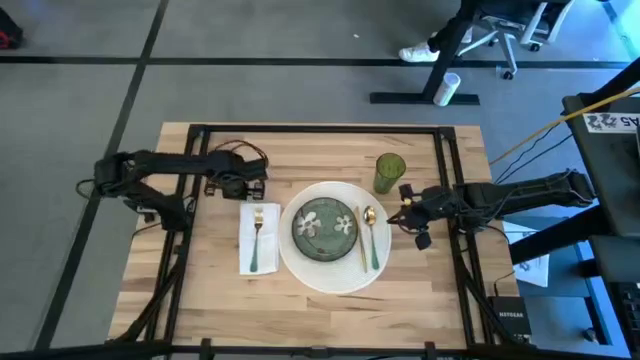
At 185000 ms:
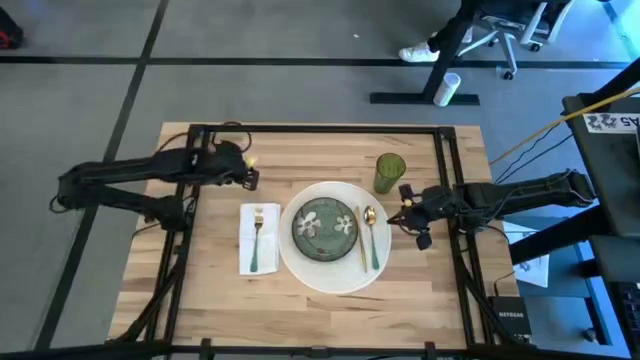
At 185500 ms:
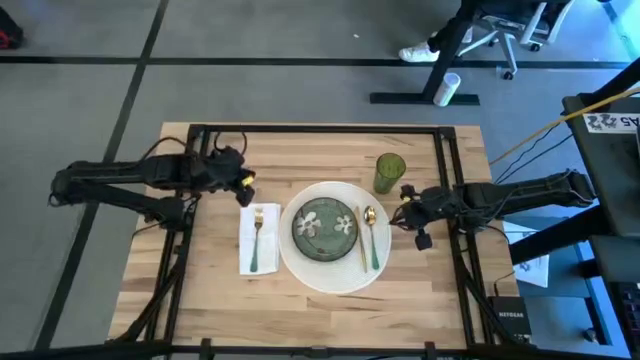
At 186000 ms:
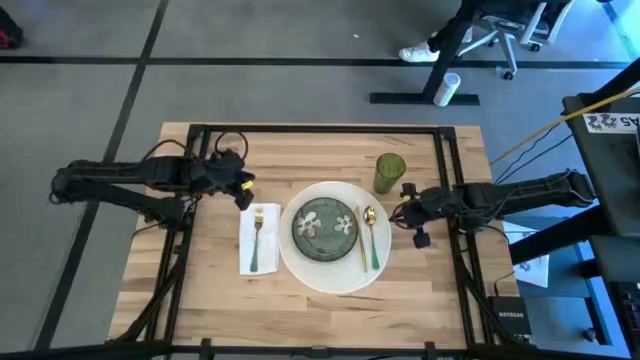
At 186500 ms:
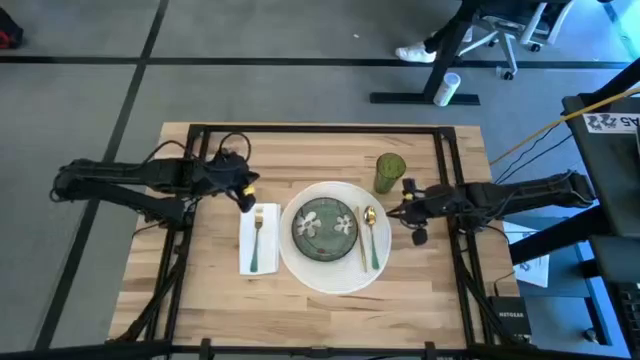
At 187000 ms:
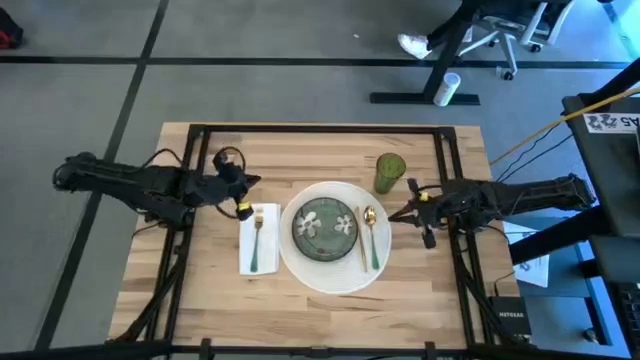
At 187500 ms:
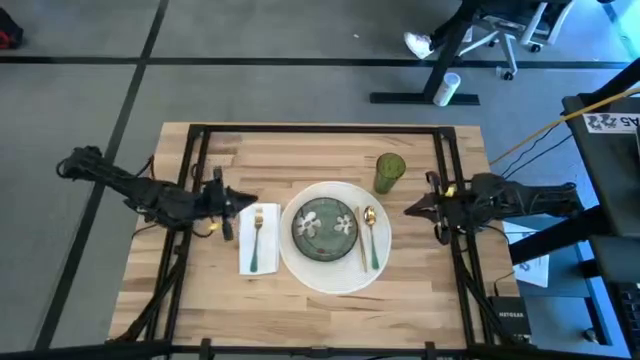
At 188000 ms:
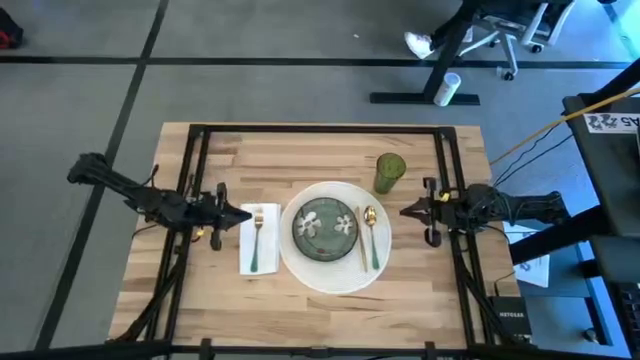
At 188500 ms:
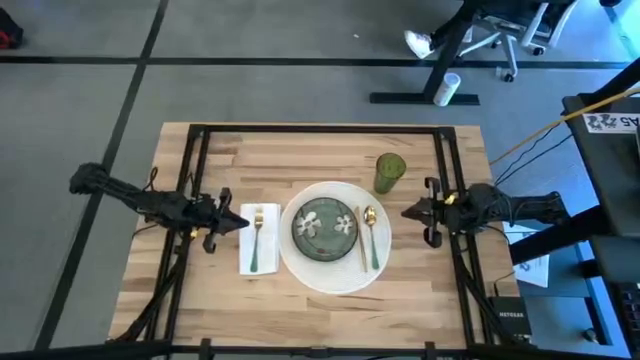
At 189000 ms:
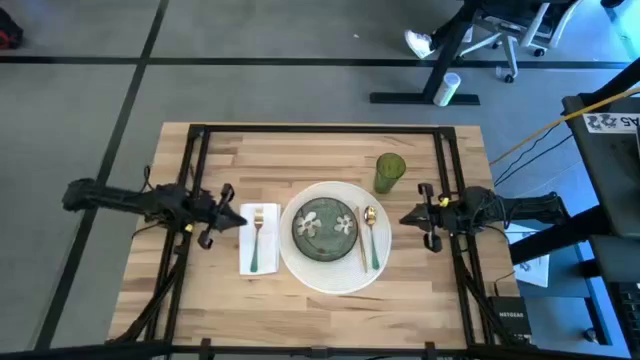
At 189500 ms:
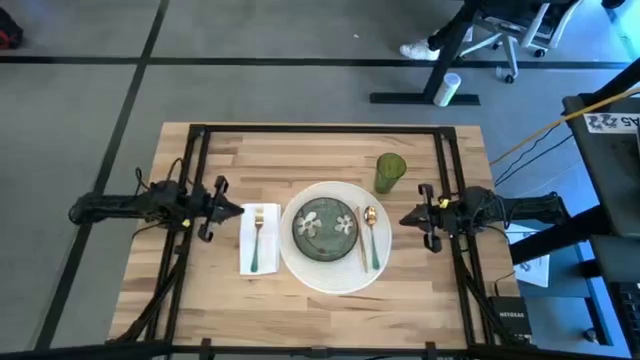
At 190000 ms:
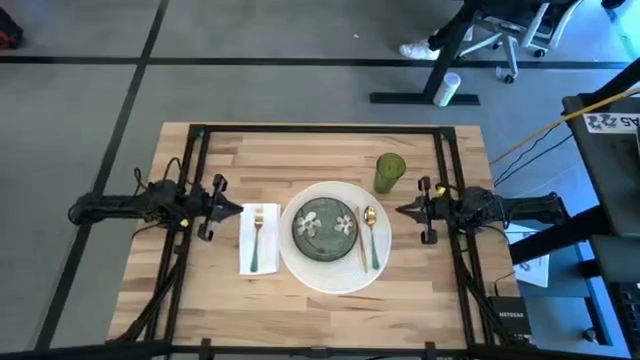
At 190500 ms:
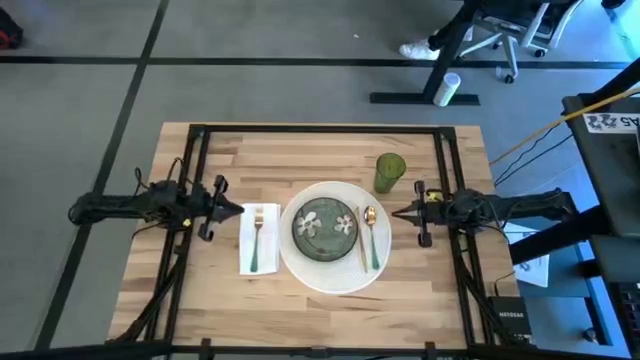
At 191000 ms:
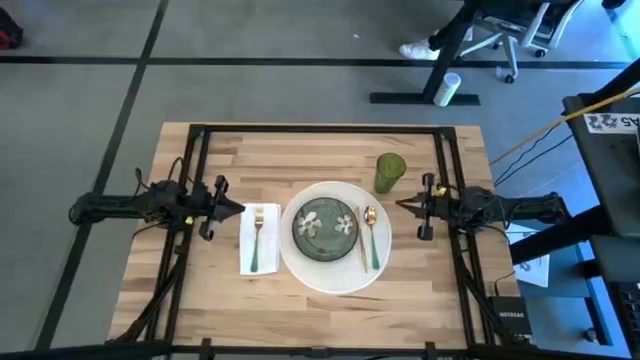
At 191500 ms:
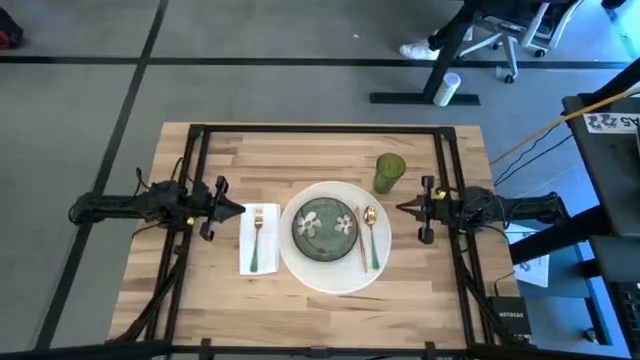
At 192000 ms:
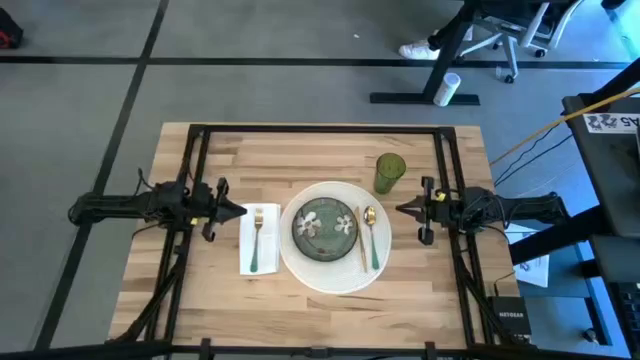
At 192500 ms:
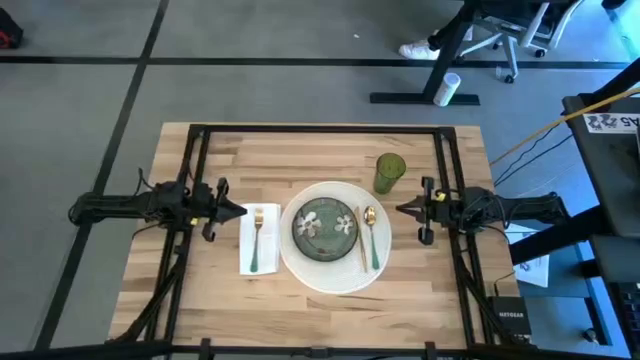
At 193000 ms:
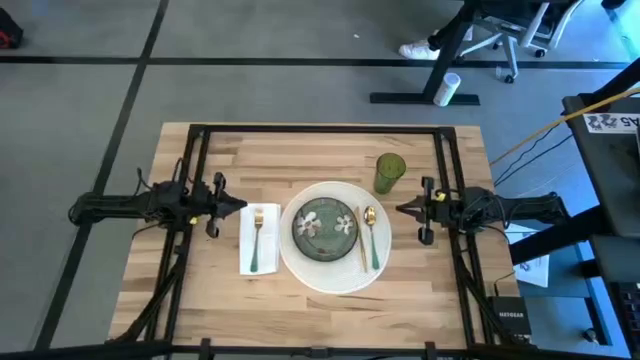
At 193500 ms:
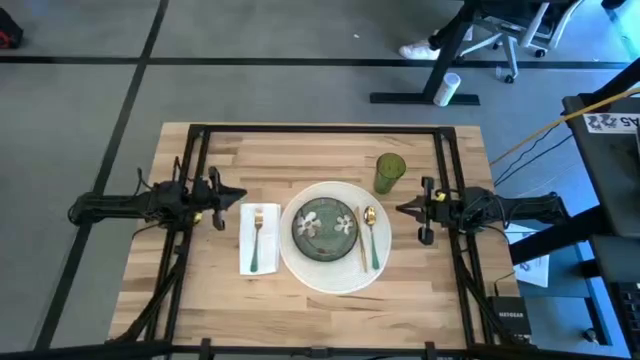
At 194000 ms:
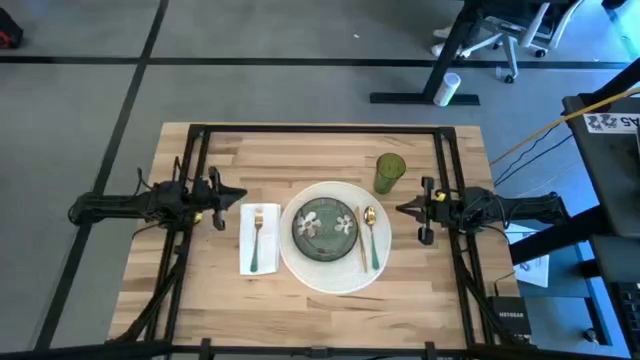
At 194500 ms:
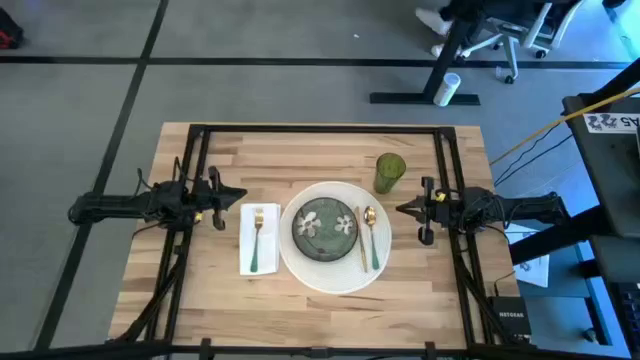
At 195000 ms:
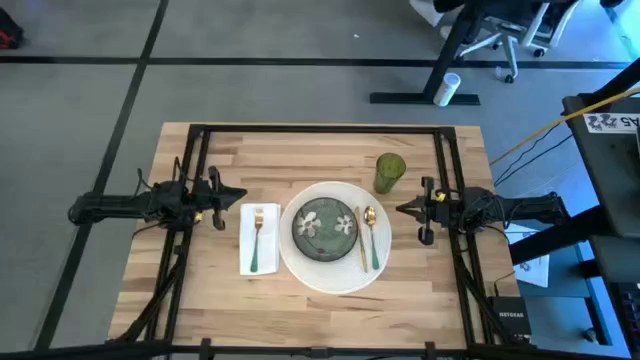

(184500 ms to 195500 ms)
Task: Set table place
Return to Home Position

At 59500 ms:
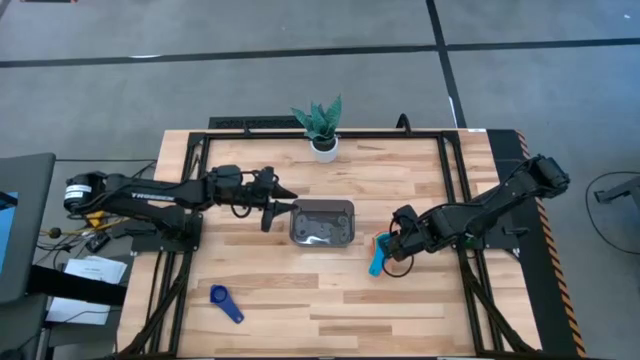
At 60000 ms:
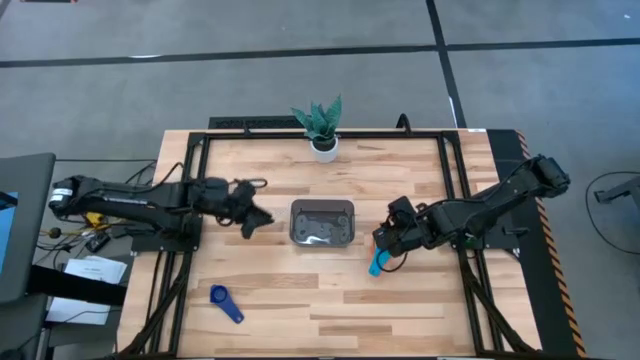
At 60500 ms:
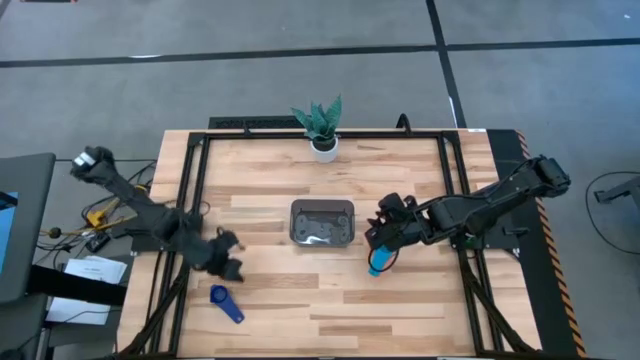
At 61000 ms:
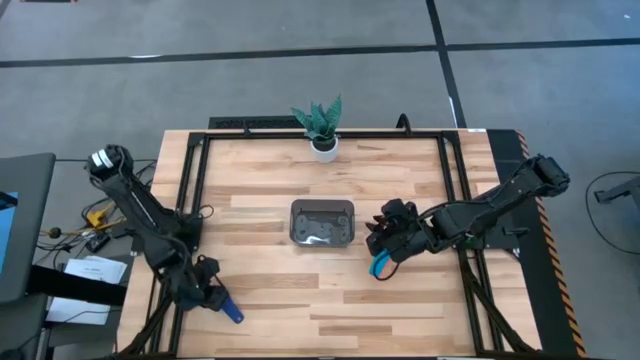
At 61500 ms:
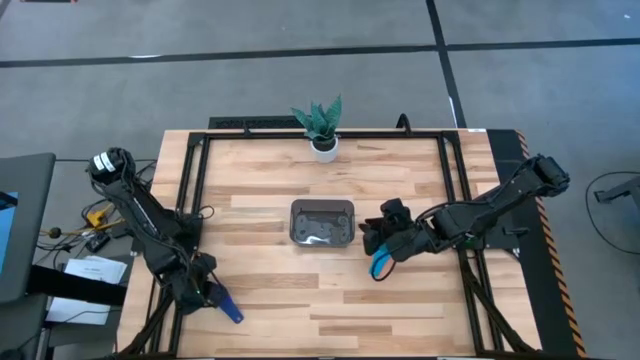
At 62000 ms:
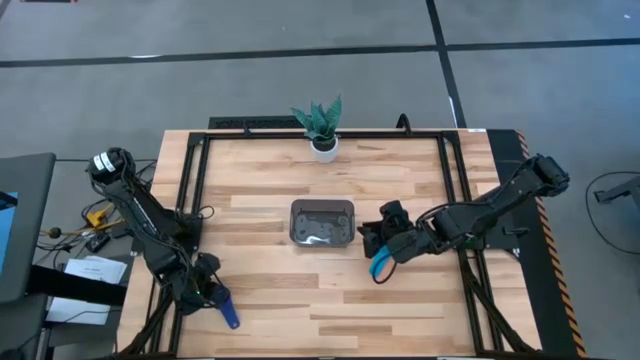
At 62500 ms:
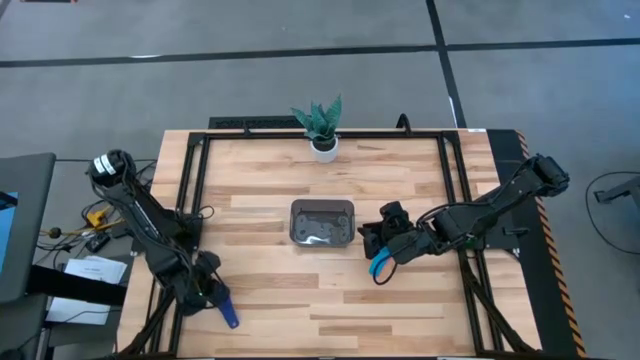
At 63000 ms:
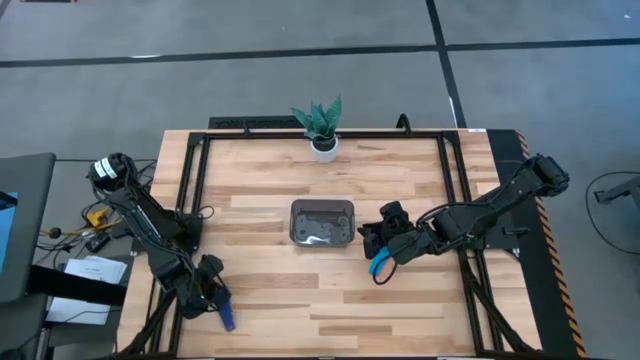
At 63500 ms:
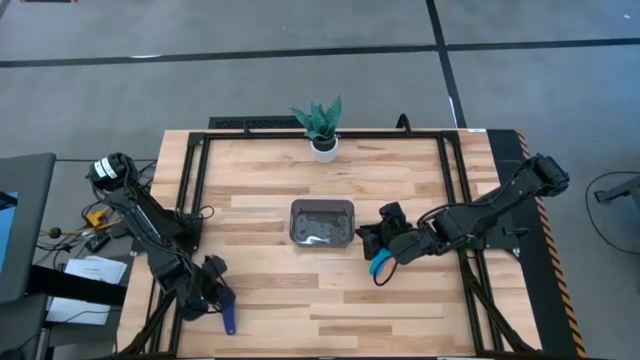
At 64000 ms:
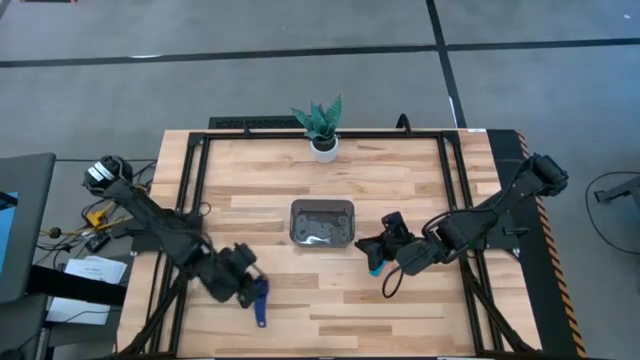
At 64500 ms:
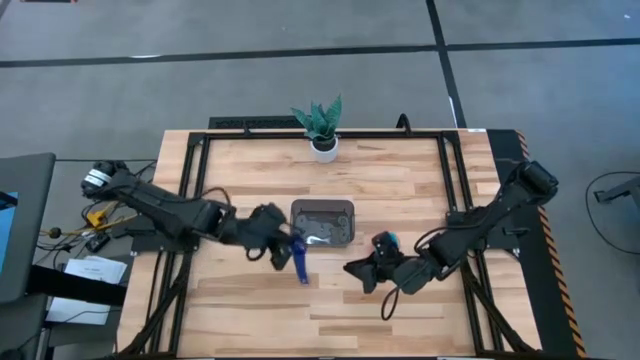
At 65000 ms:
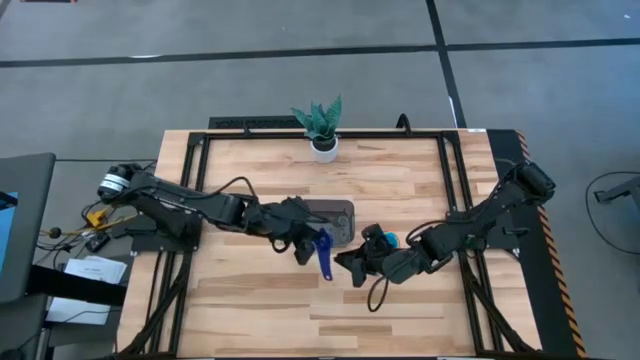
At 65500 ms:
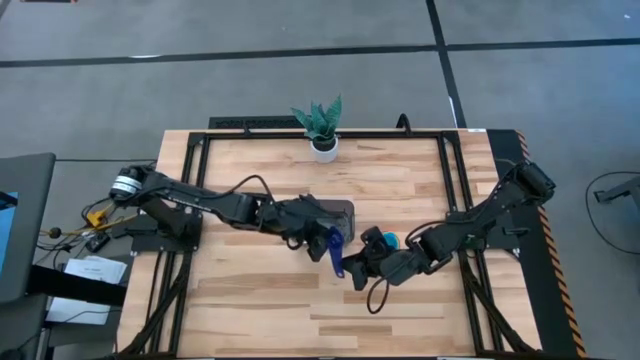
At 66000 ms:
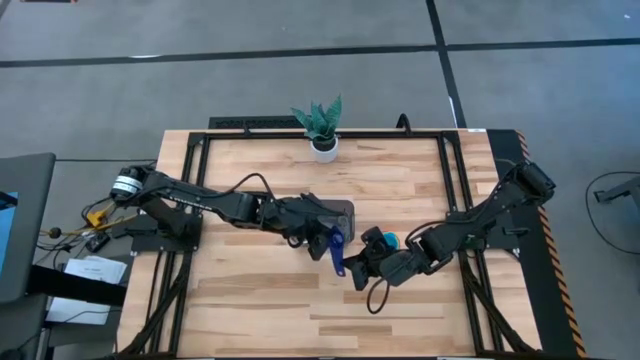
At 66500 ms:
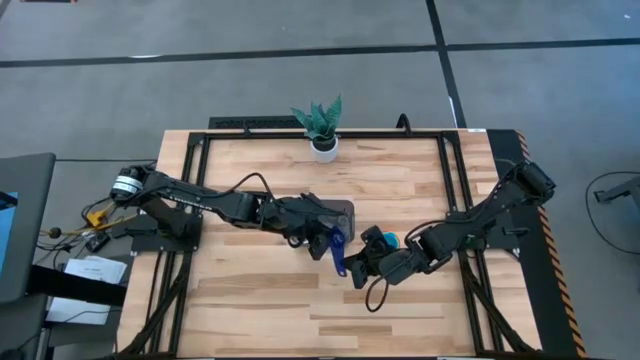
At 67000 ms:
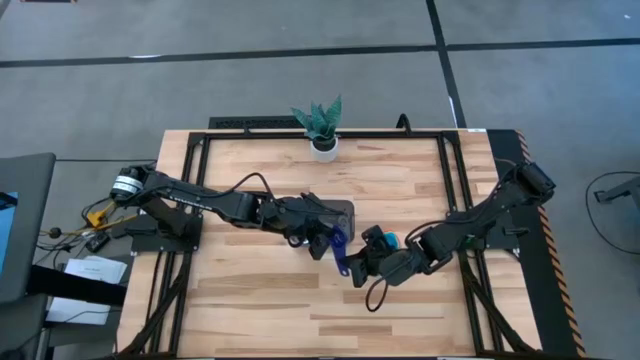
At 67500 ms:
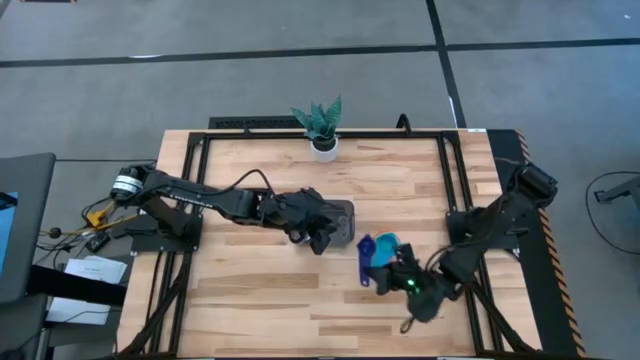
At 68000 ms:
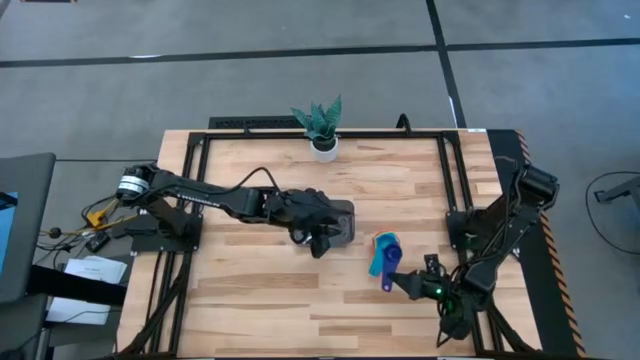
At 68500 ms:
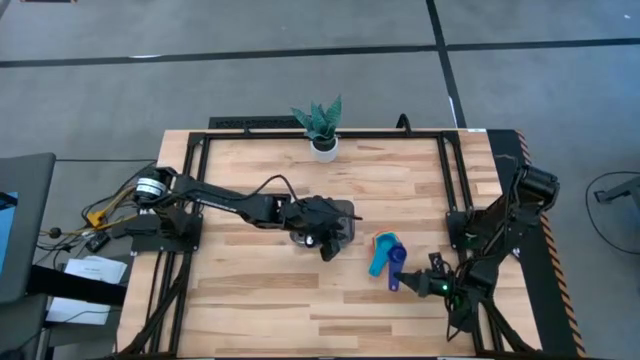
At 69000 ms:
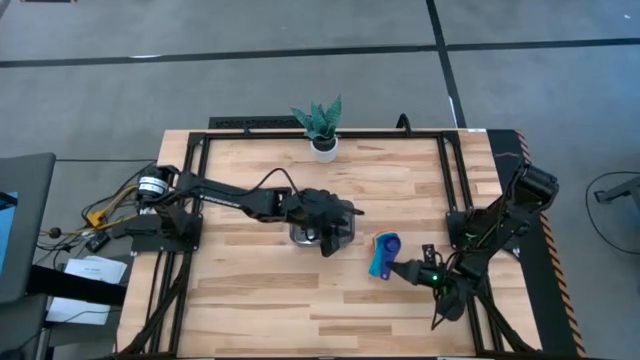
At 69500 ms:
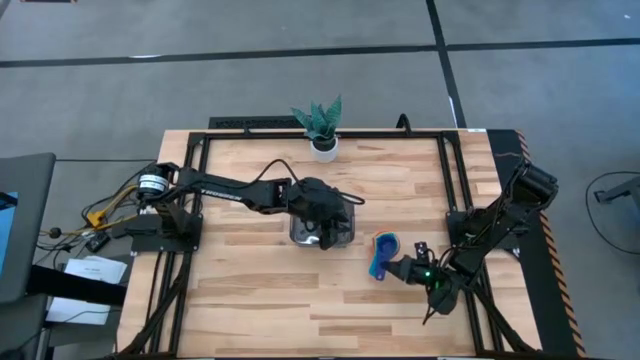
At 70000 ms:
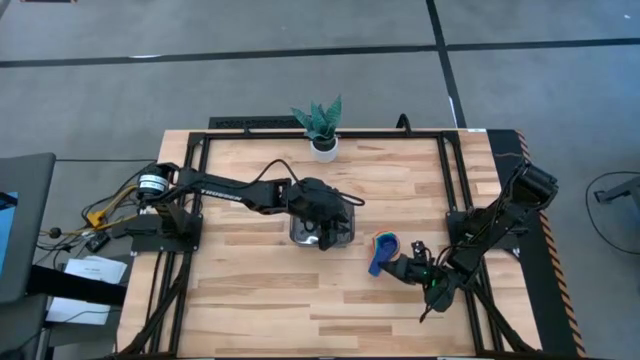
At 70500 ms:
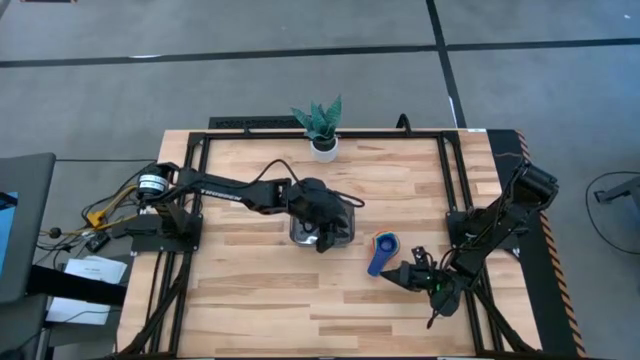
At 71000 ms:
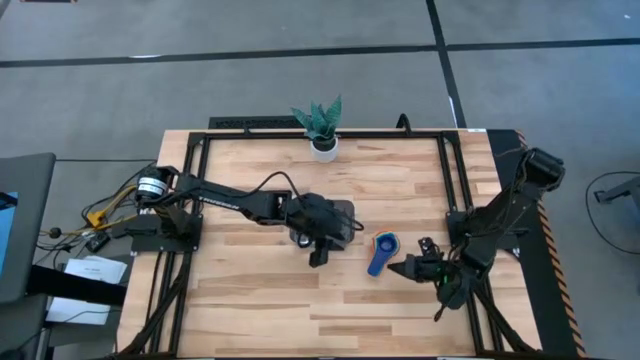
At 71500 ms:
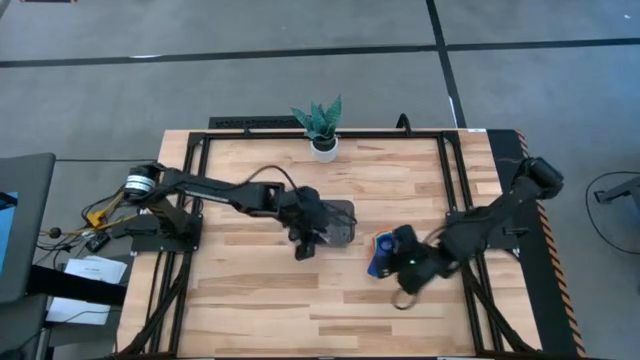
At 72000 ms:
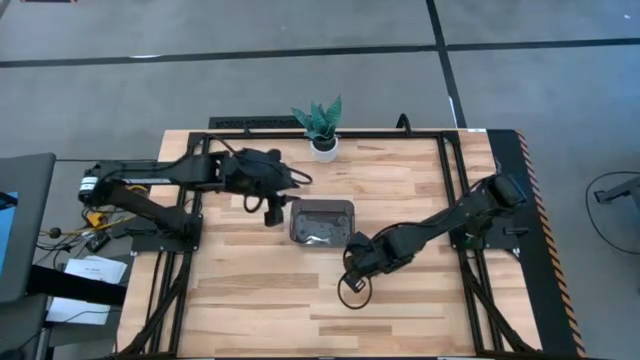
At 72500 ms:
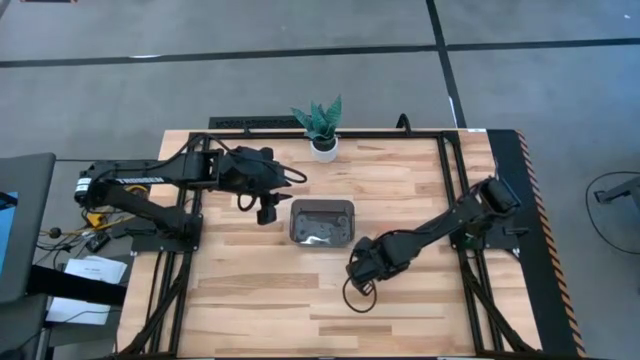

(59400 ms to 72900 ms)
Task: Nest measuring cups in basket
Stack the dark blue measuring cup on top of the light blue measuring cup
